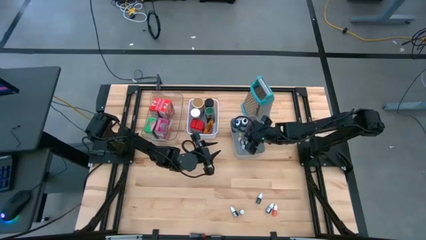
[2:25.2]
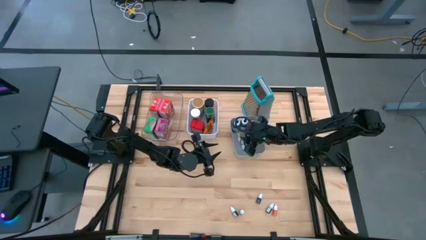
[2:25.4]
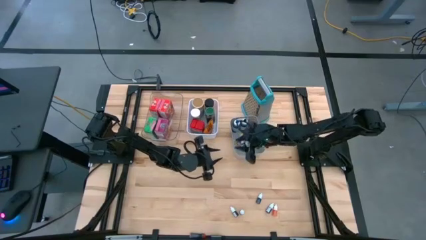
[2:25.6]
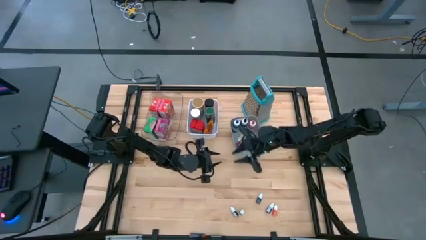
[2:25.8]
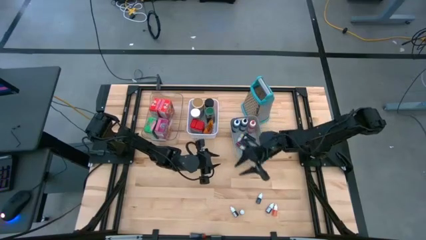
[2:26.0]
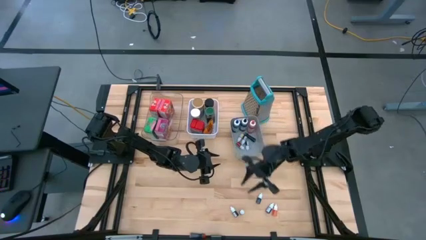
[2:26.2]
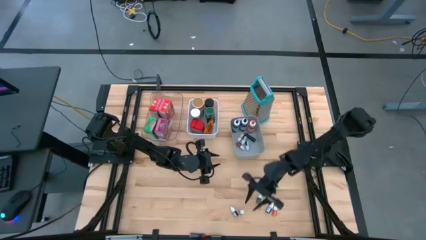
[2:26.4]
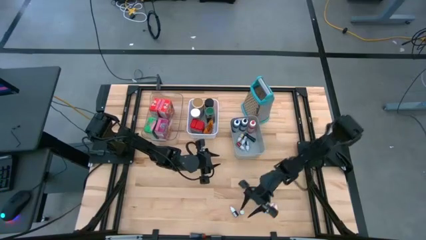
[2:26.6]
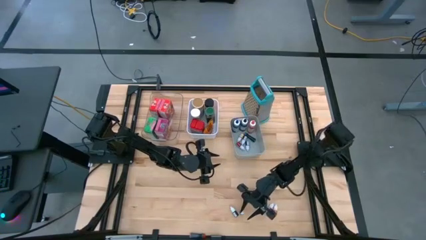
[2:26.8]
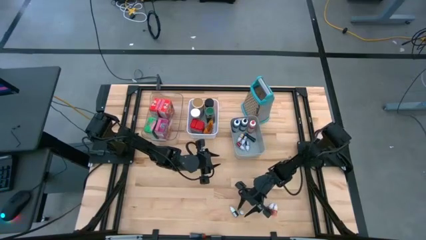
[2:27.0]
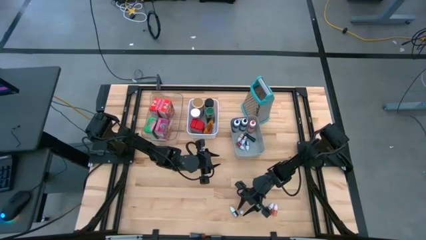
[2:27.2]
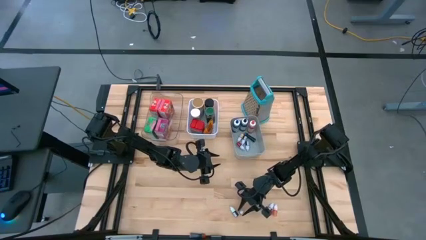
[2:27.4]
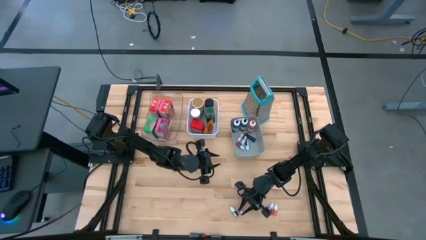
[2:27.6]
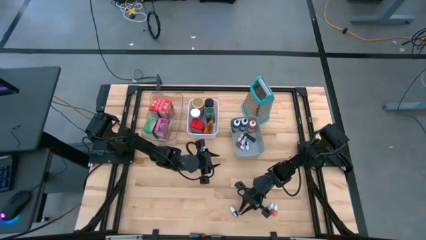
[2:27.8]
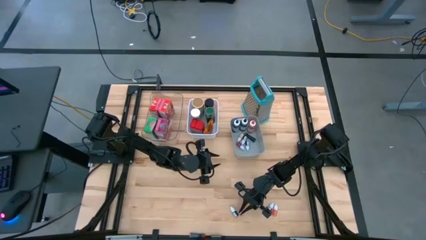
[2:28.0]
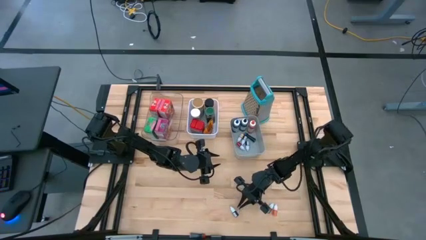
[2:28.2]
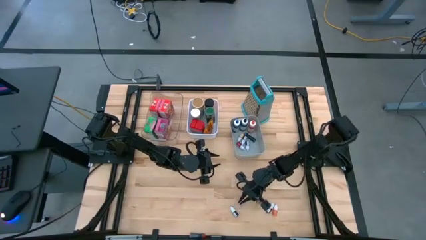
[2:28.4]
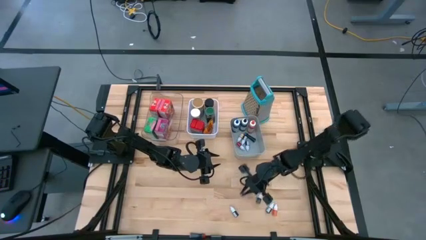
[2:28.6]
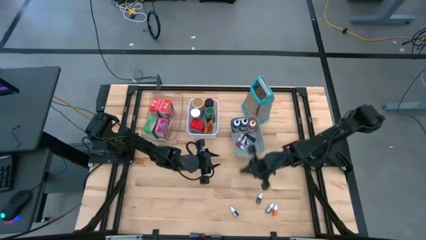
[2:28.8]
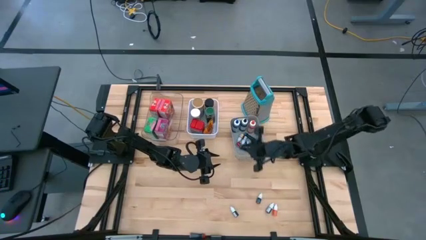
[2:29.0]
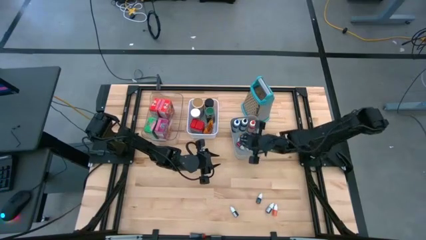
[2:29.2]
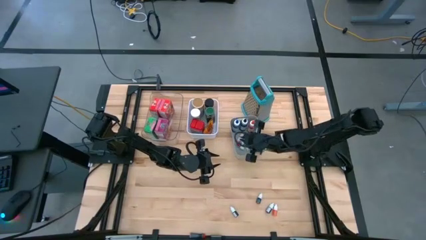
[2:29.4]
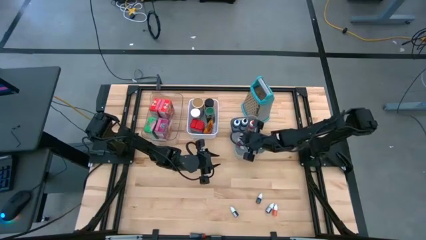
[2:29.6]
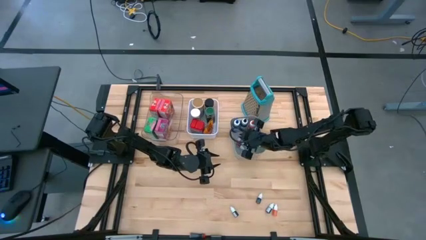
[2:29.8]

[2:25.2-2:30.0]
Task: Pick & Place Kitchen Items
Put the small red food coloring into the gray bin

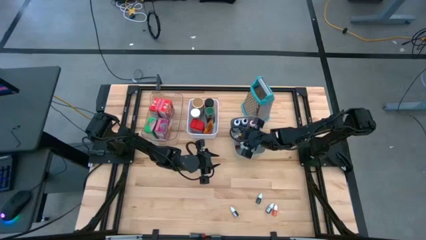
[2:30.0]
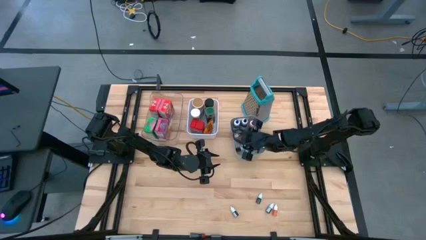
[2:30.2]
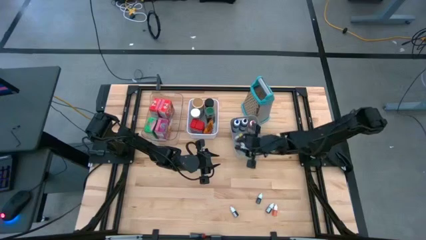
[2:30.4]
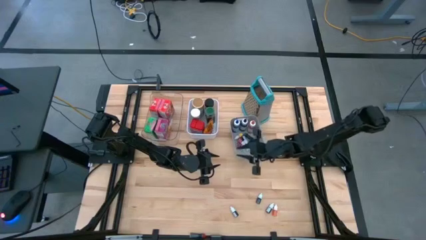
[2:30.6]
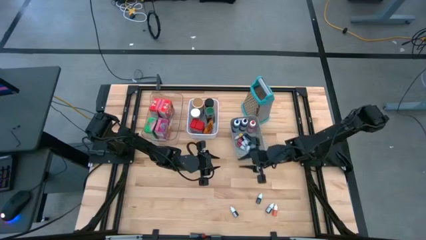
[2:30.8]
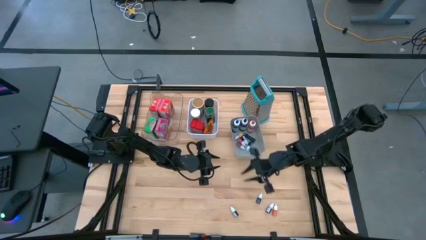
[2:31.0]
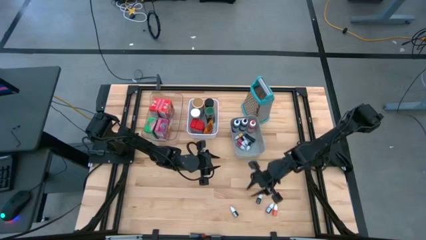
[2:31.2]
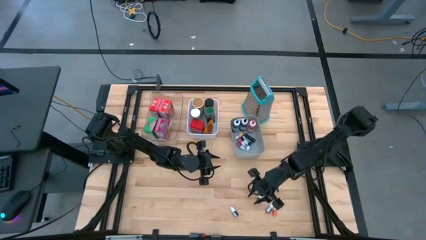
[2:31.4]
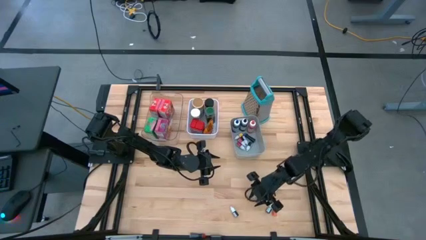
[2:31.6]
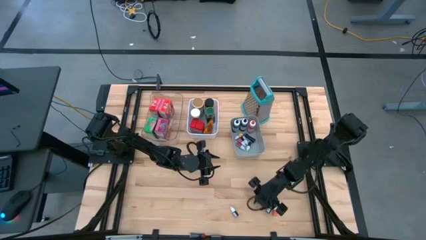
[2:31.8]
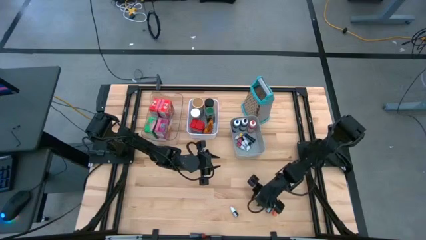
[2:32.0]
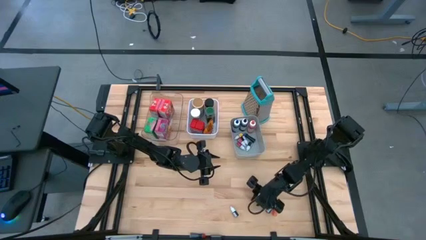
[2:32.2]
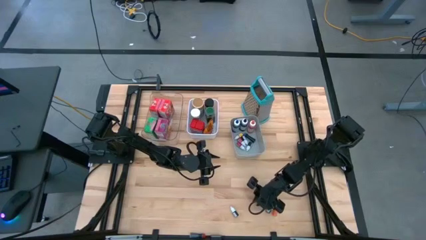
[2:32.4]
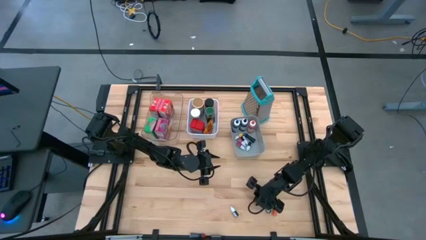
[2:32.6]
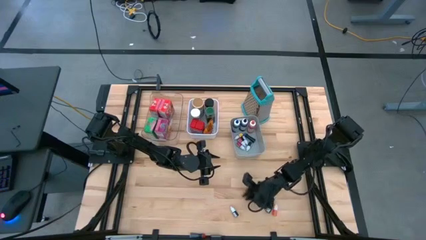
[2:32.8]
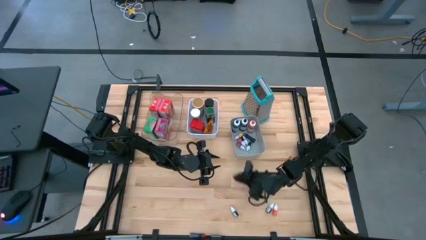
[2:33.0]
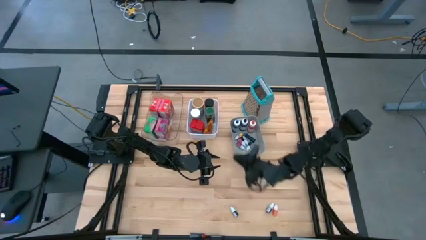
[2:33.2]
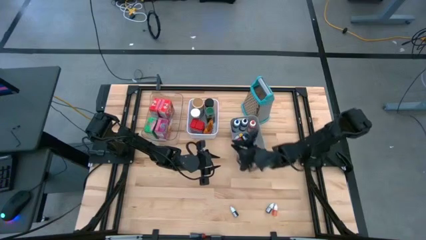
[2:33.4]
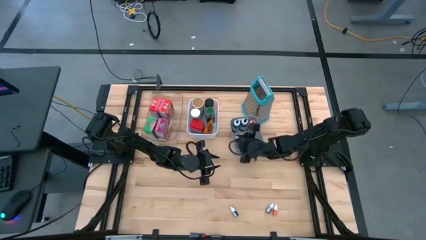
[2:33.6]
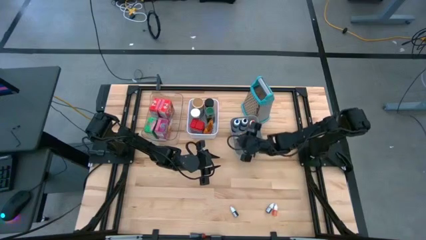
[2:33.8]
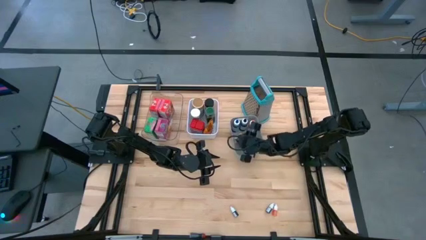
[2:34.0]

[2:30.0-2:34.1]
Put the small blue food coloring into the gray bin

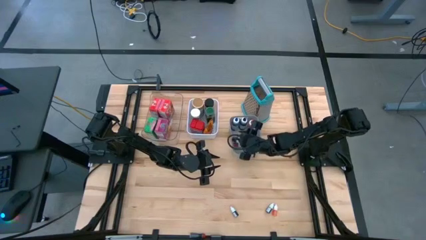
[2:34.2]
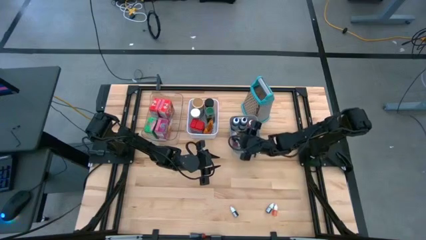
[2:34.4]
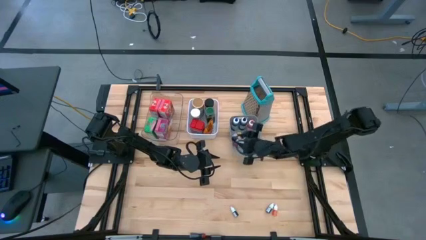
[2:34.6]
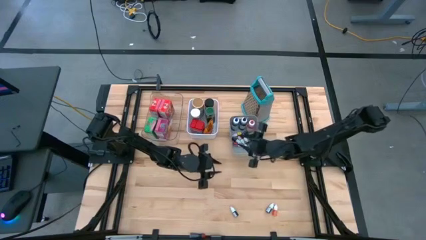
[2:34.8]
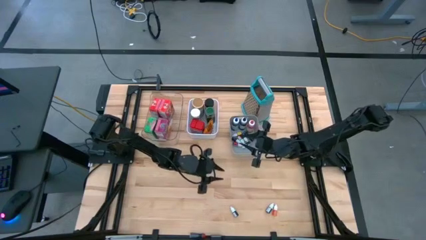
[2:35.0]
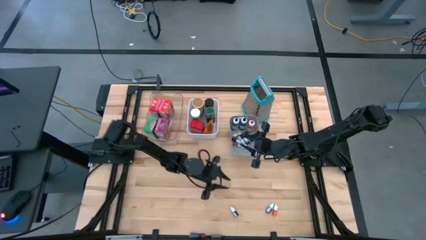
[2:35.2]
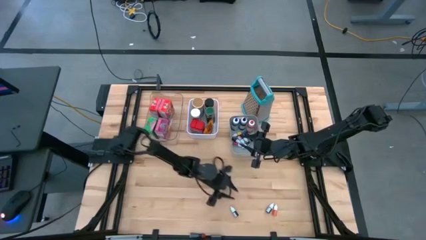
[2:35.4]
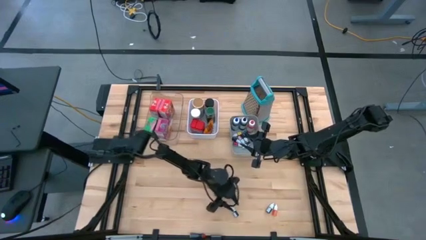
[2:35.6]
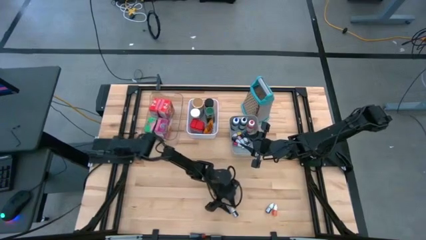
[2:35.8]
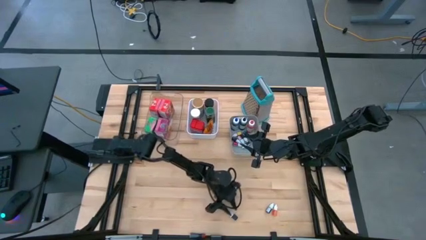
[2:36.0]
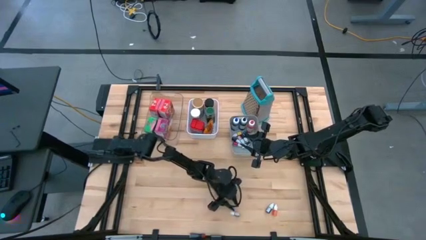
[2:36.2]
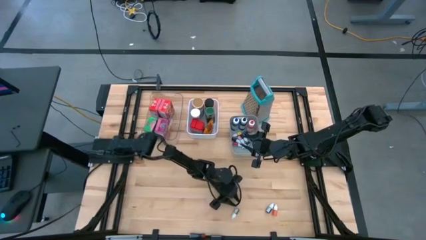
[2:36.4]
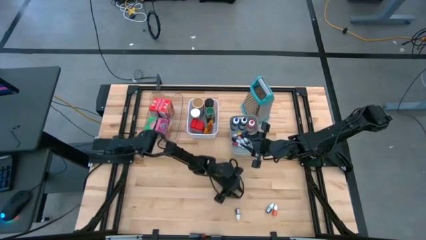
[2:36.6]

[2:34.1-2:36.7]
Put the small blue food coloring into the gray bin

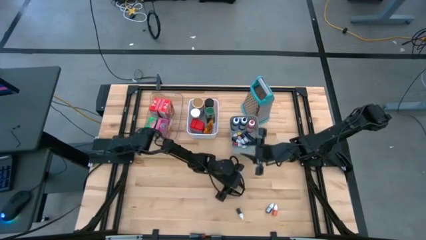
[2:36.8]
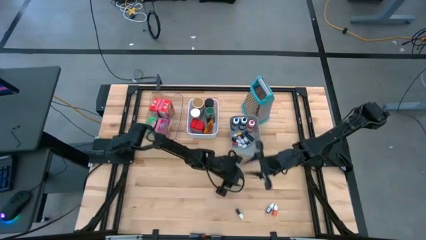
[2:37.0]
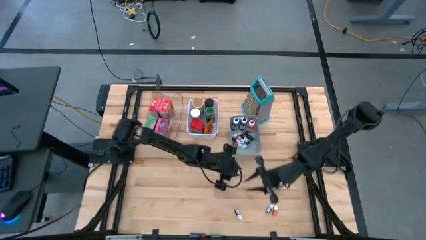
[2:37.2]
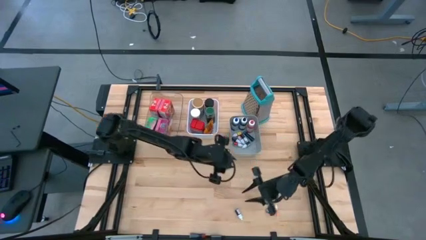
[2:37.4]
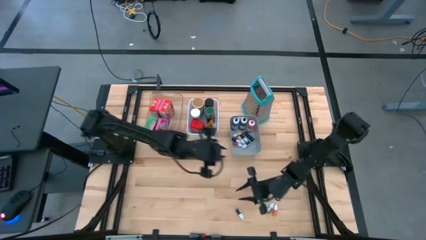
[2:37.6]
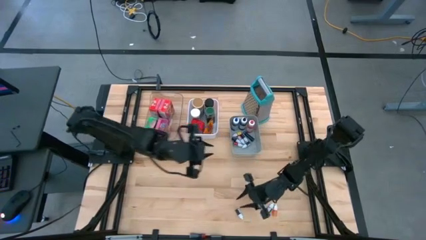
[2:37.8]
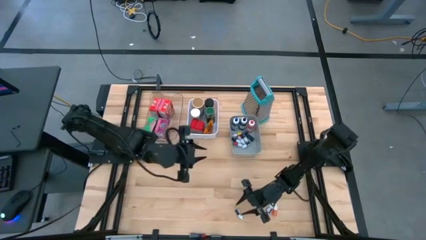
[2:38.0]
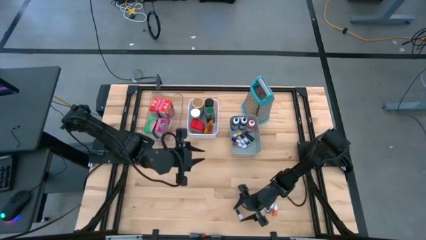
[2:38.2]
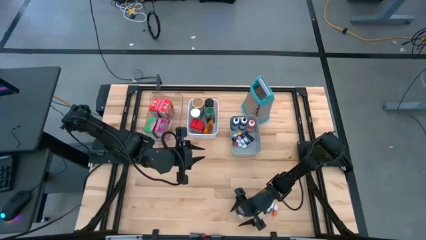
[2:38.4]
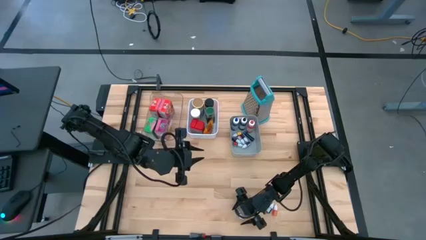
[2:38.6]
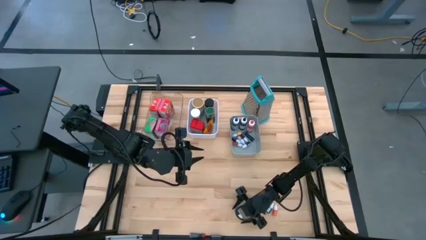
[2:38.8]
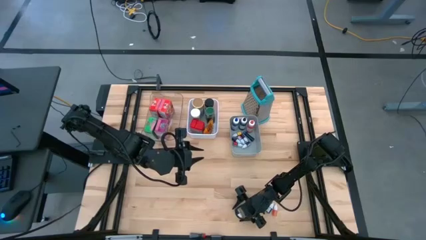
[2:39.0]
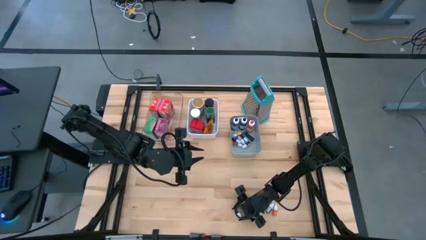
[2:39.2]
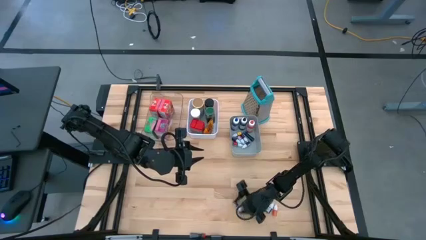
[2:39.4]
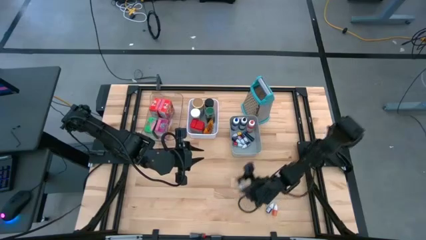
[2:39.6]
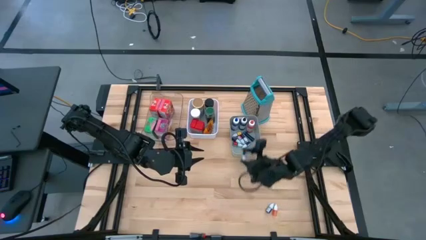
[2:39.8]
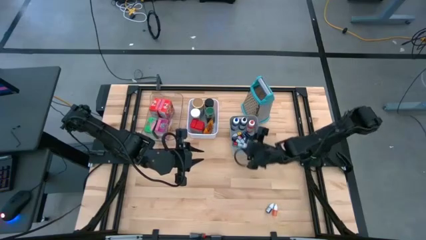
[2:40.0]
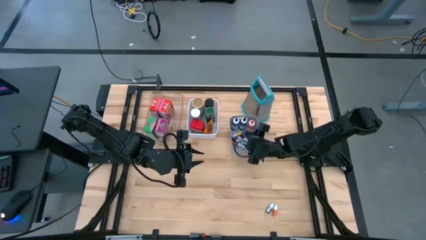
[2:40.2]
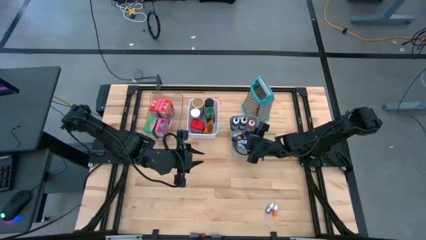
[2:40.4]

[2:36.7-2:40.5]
Put the small blue food coloring into the gray bin
